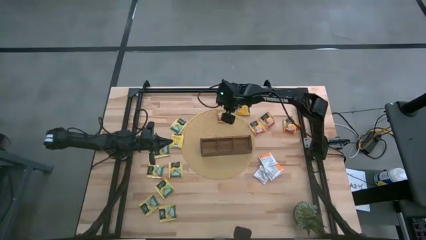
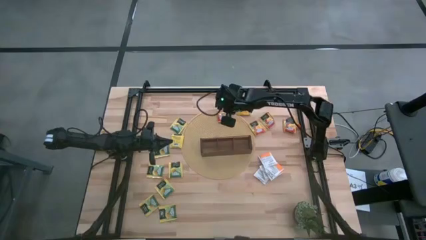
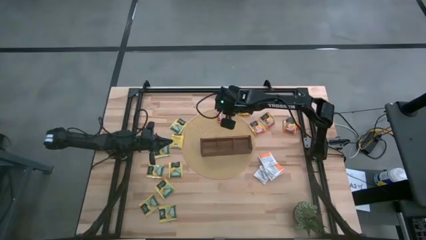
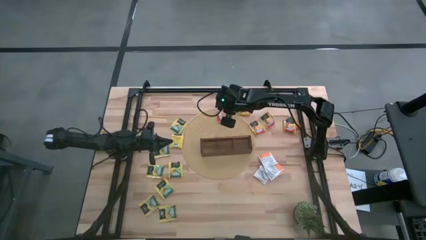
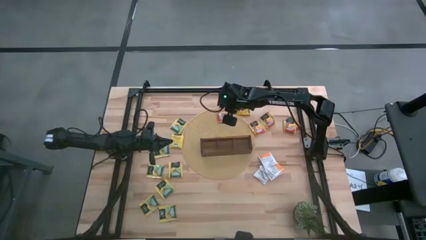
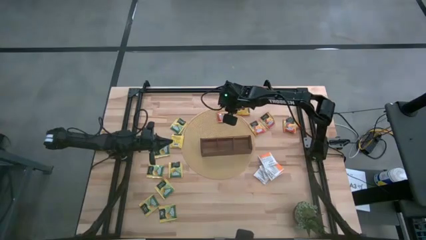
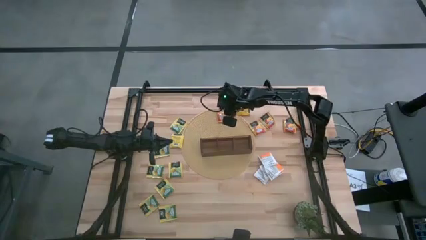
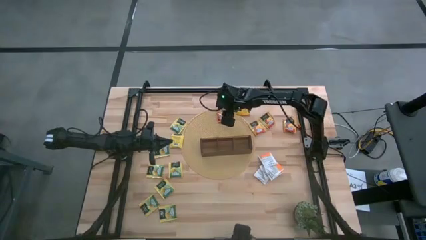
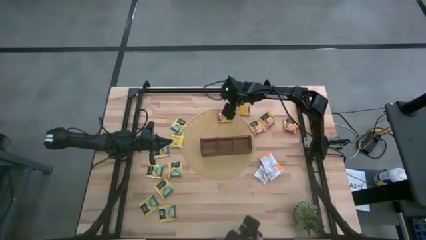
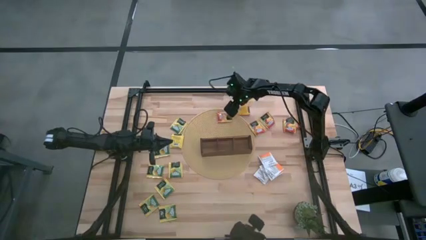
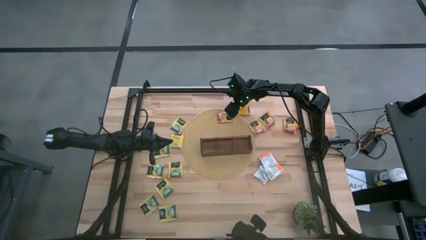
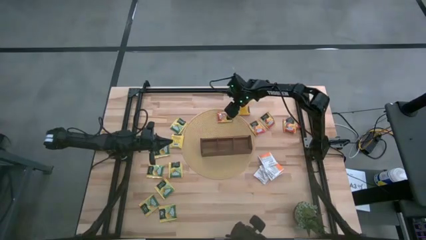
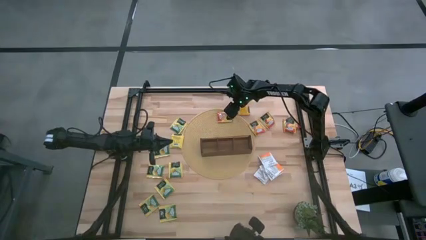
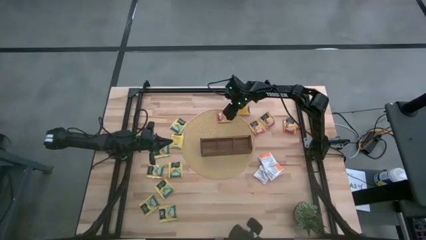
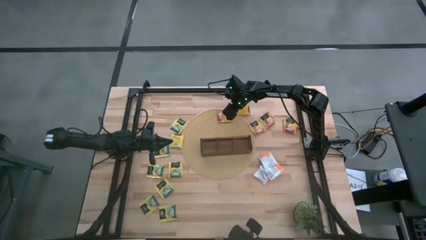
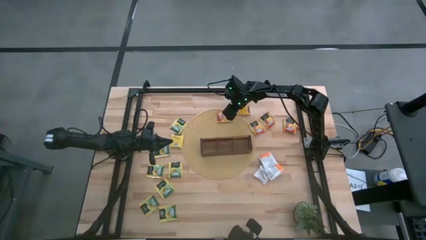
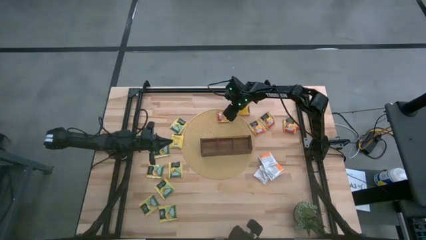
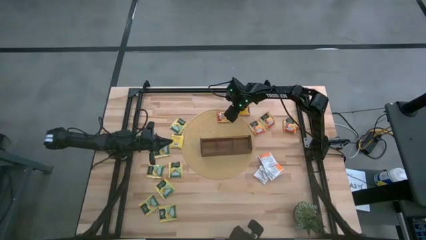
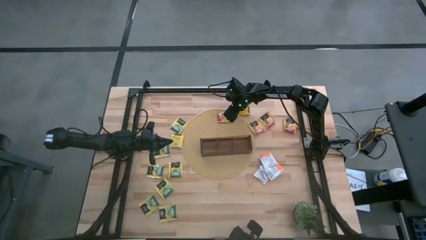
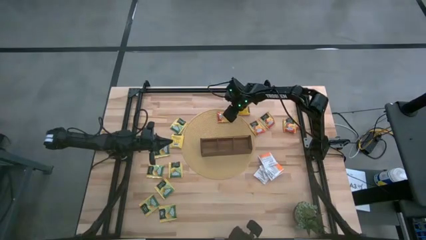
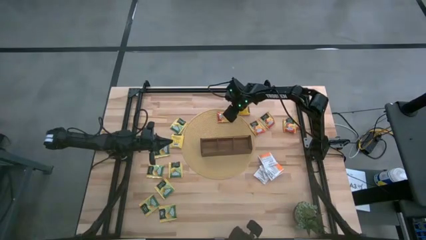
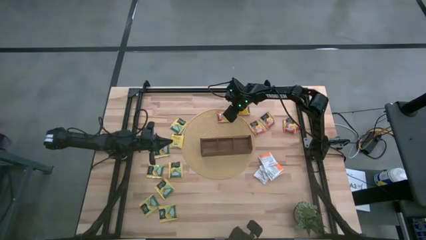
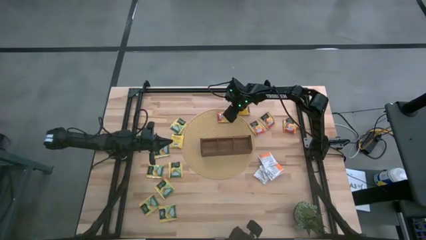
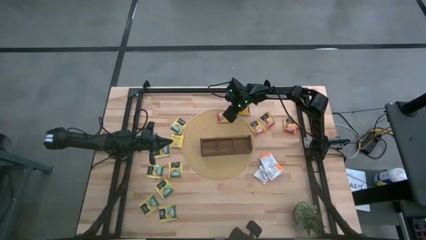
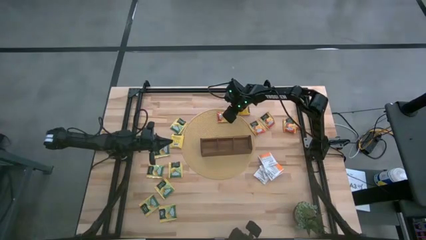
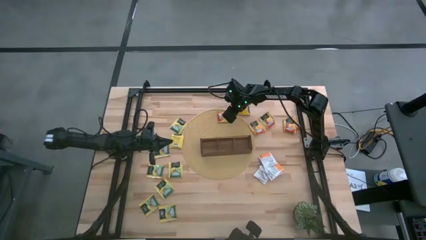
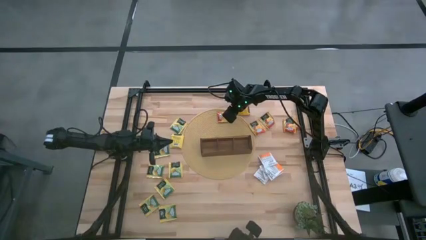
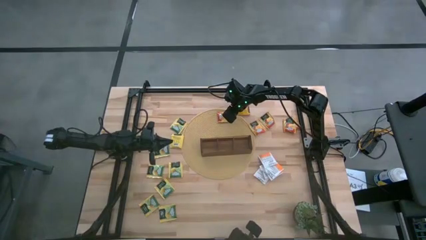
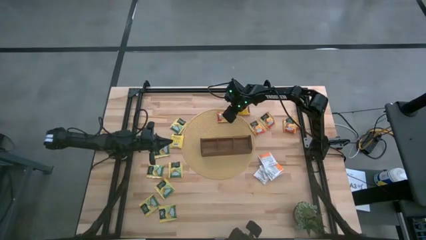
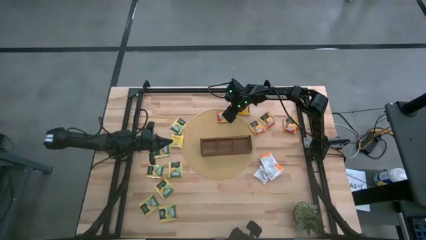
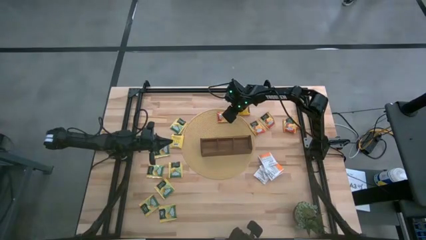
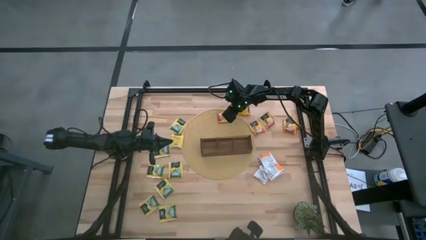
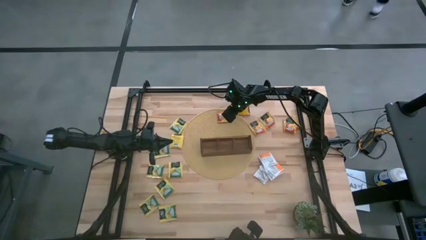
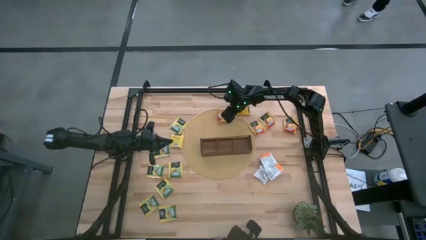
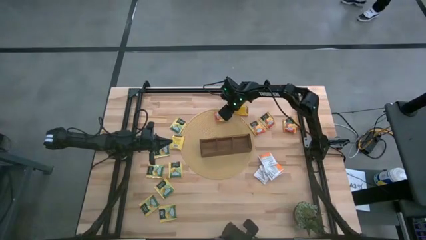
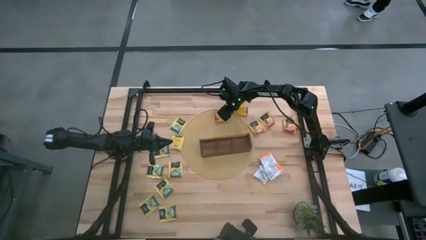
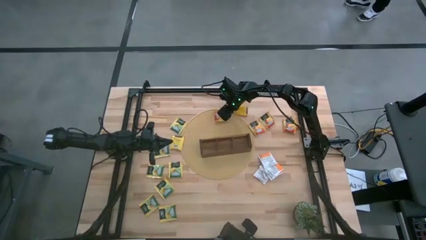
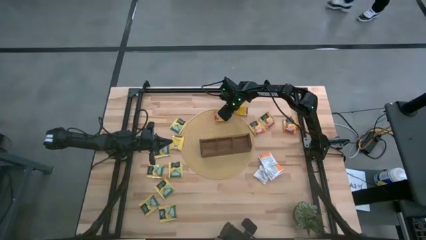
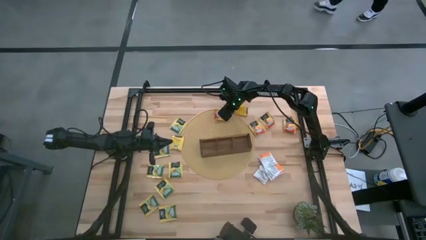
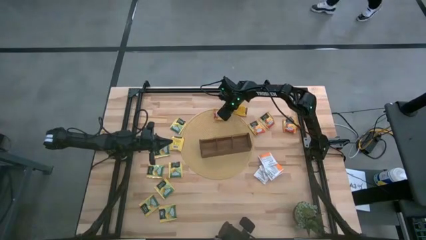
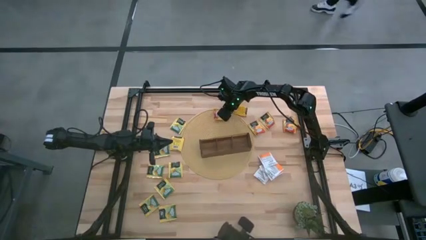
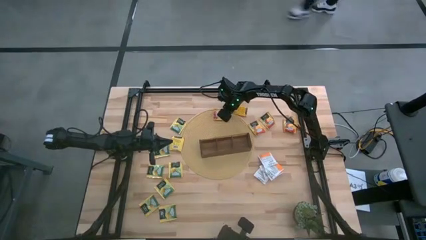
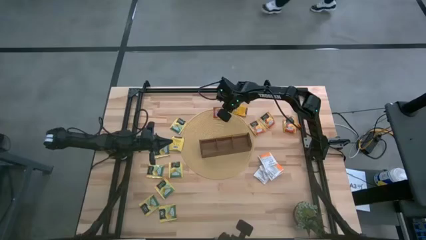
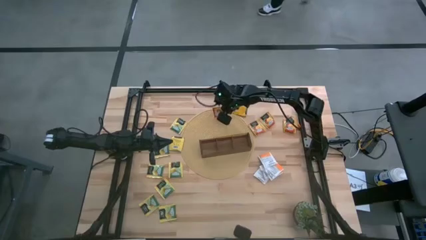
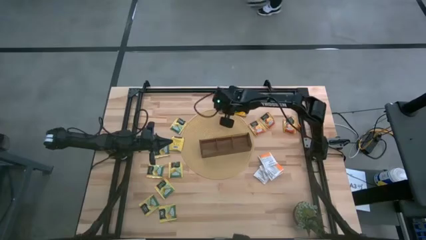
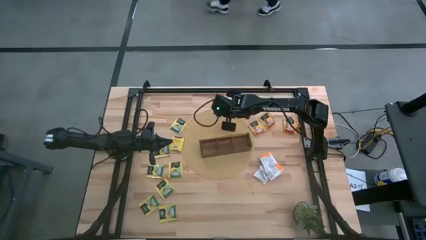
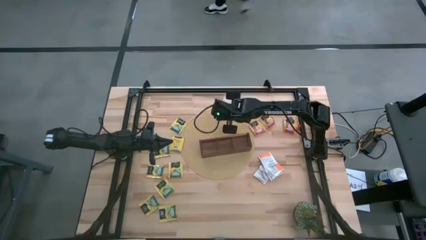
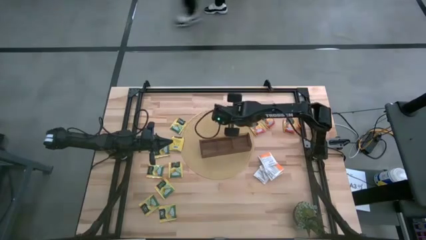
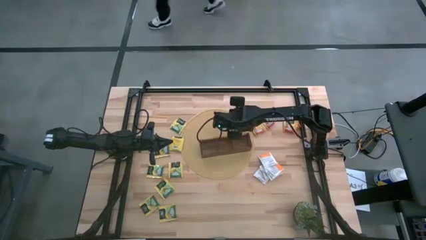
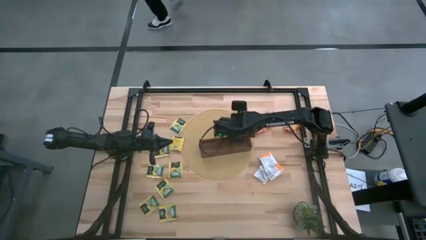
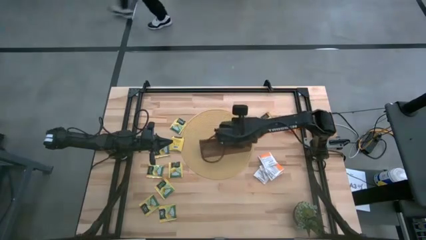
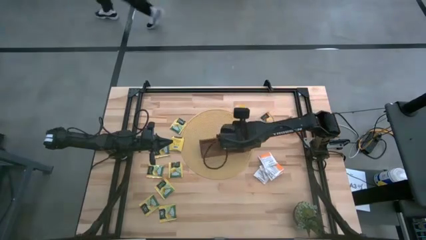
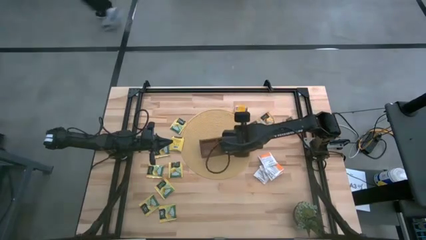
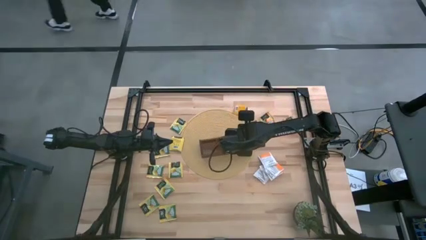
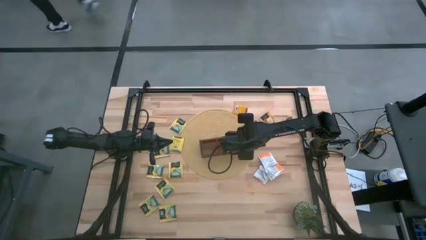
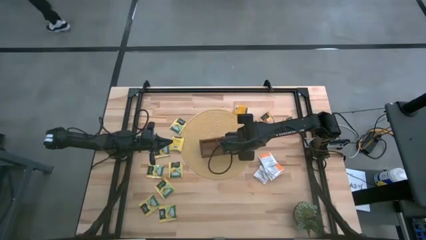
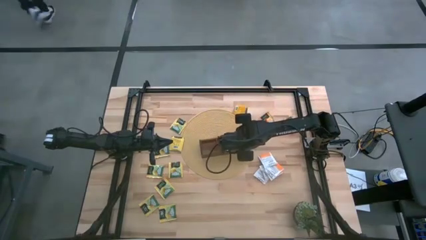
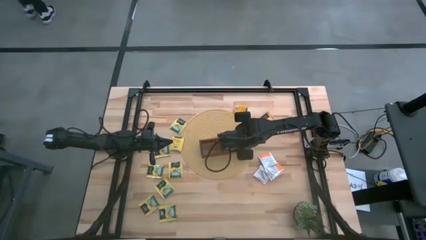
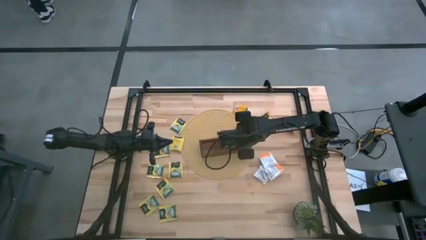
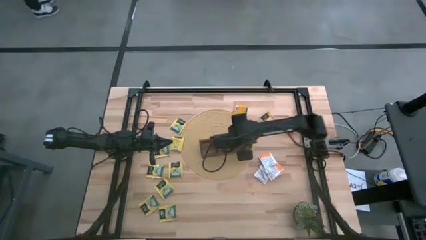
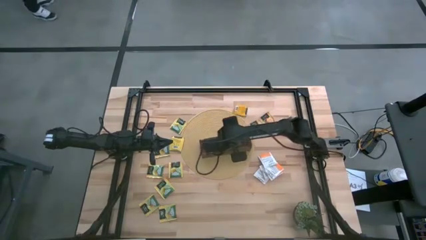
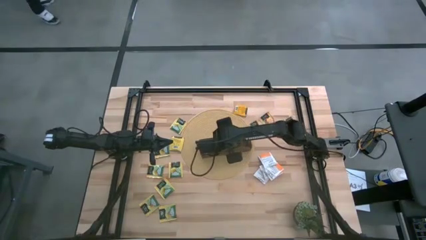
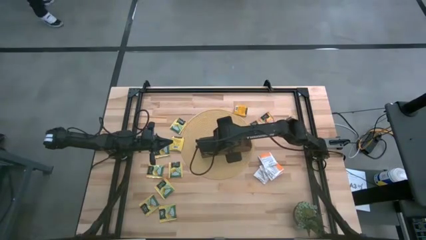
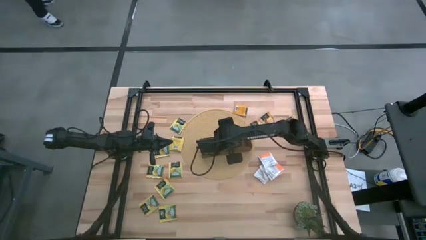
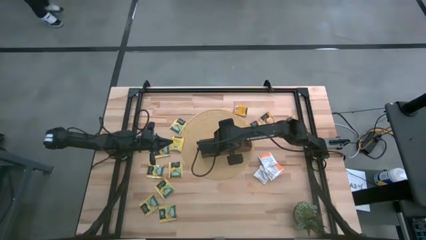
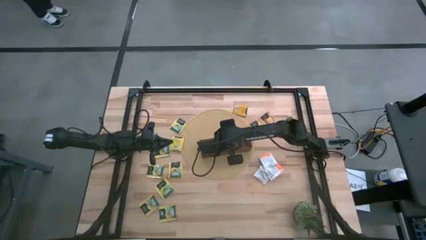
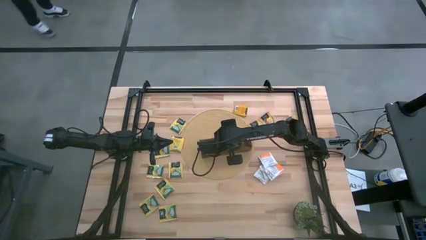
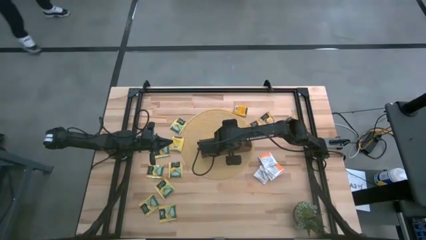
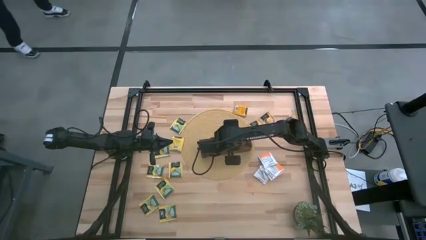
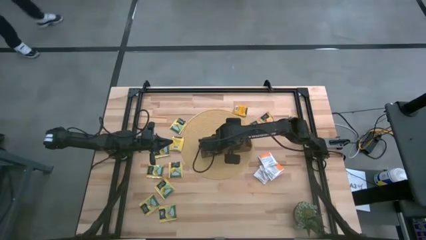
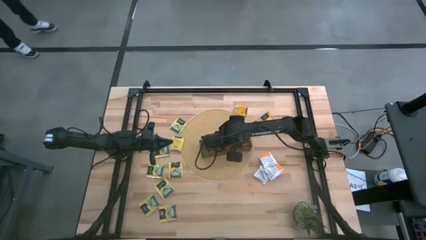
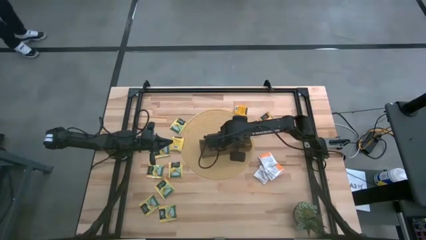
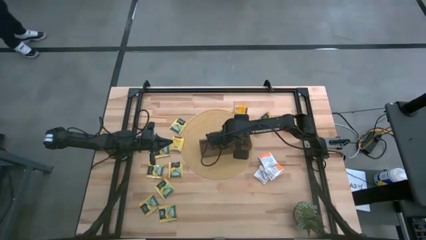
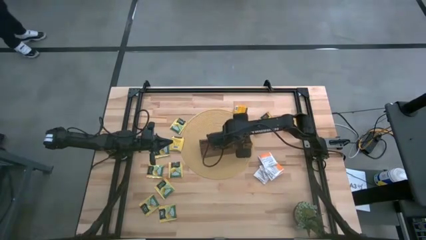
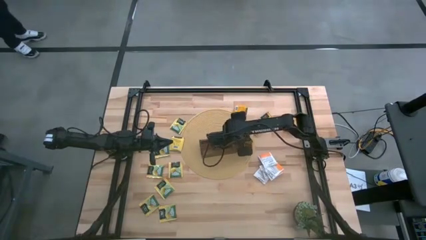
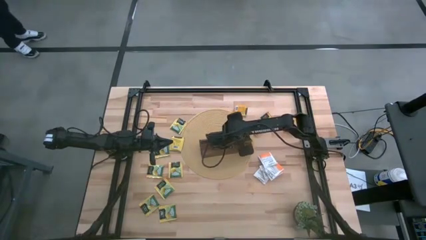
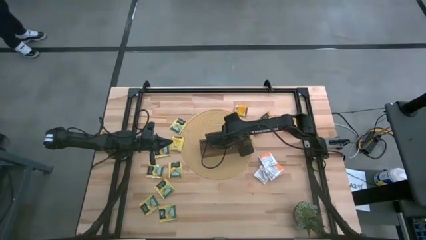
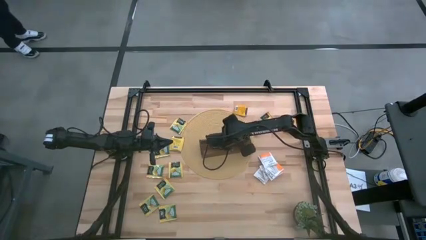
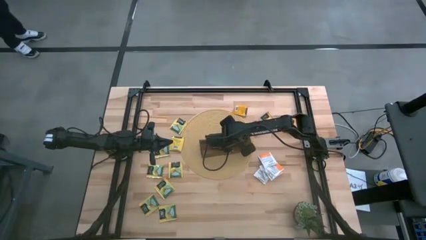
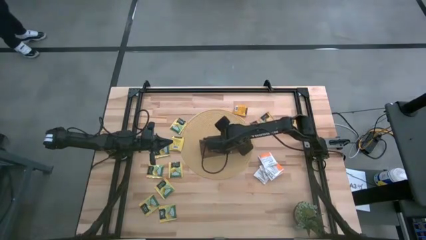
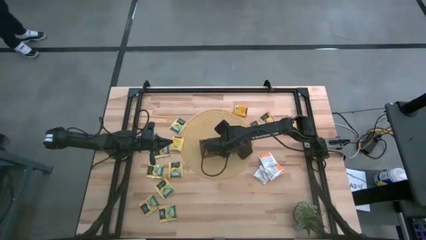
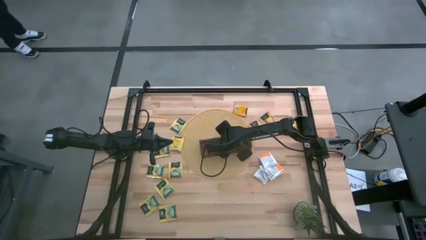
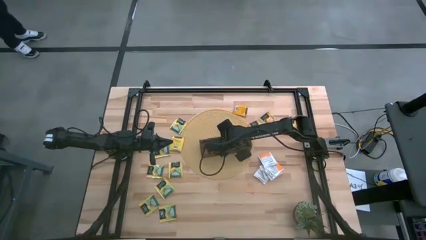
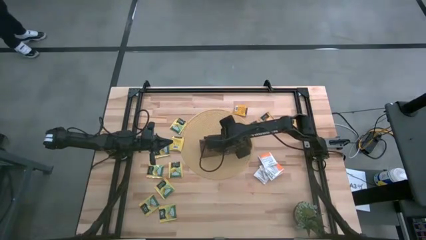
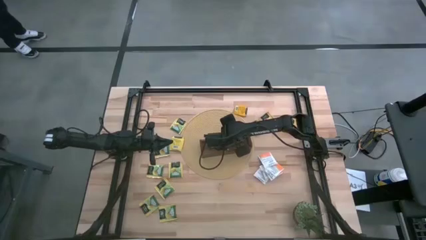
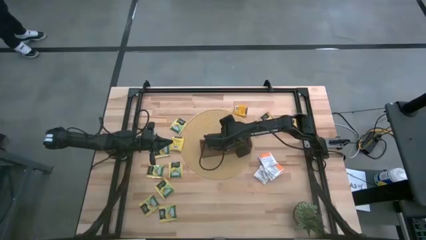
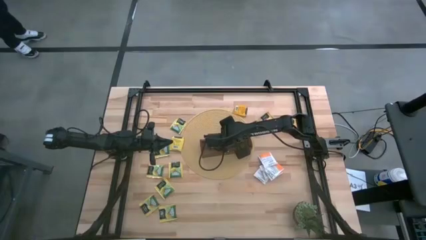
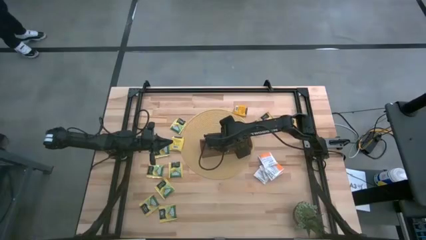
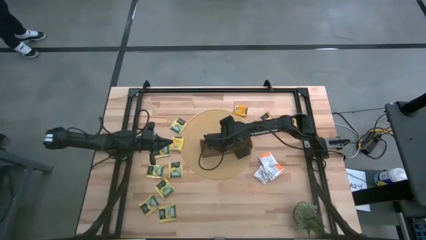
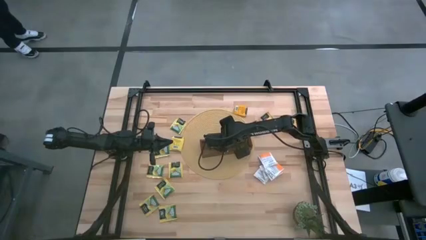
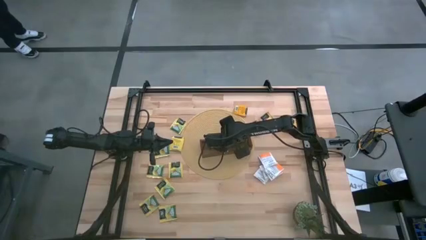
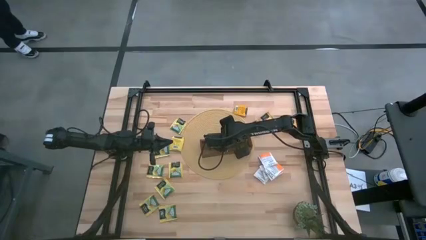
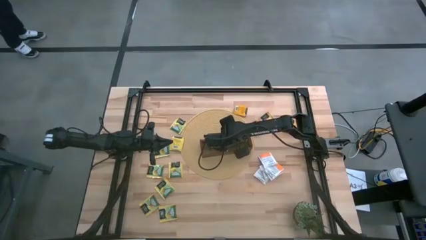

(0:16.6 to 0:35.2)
Task: Pick & Place Tea
Put the orange tea bag into the right section of the wooden organizer
